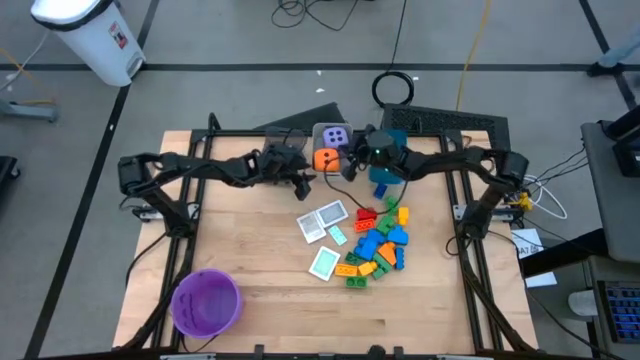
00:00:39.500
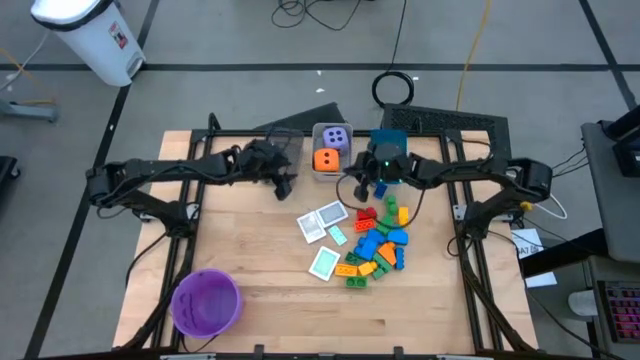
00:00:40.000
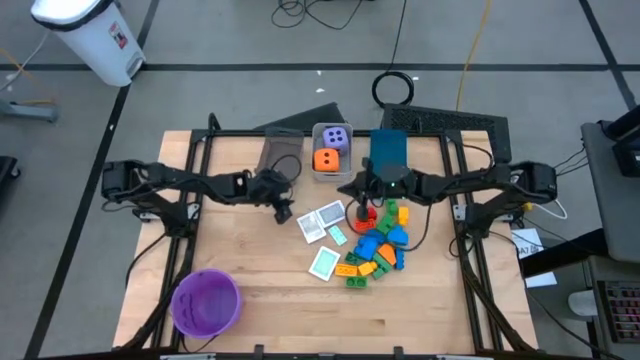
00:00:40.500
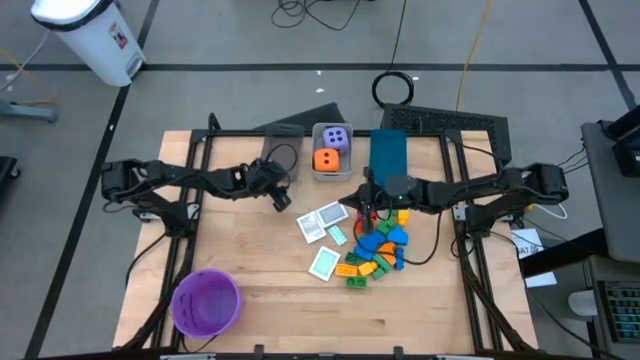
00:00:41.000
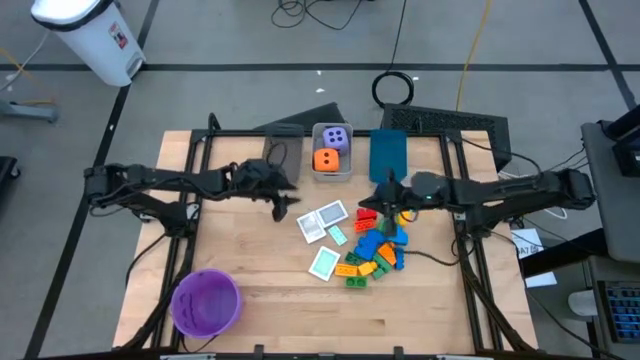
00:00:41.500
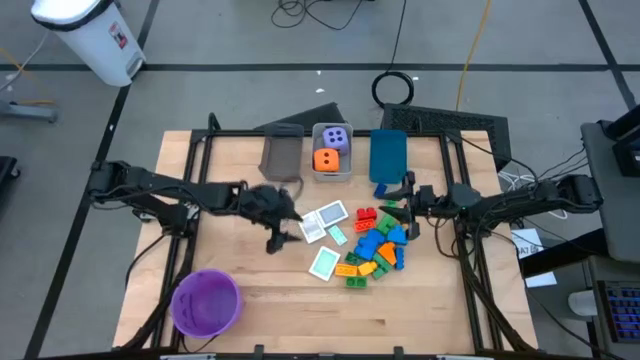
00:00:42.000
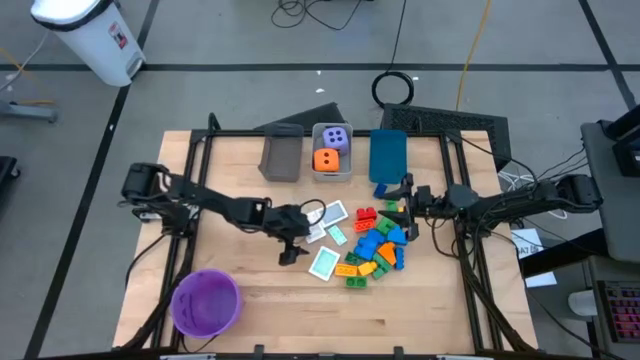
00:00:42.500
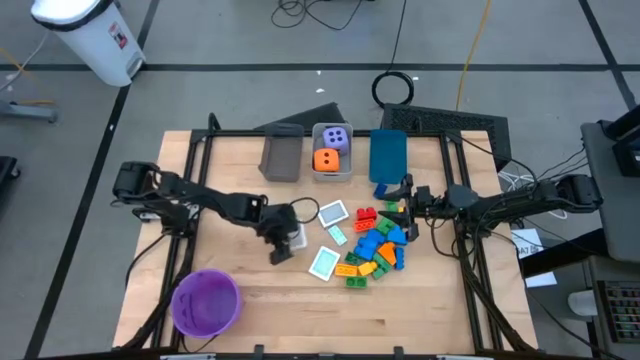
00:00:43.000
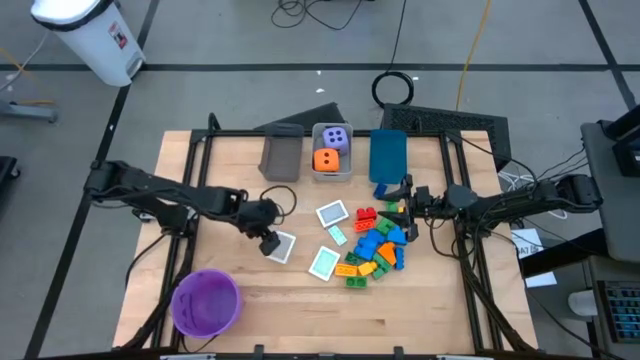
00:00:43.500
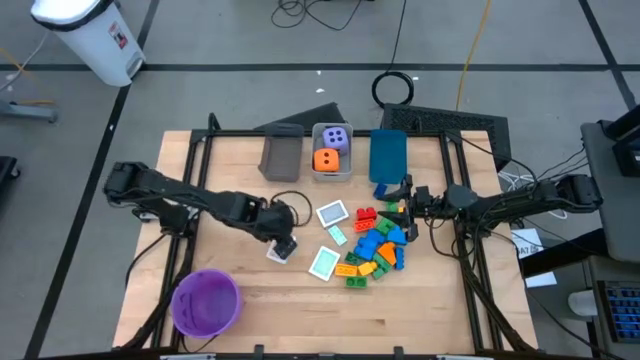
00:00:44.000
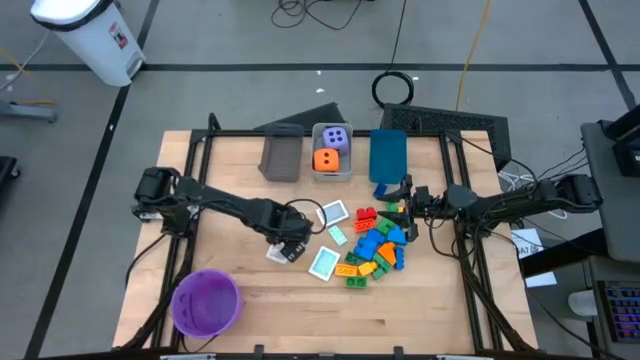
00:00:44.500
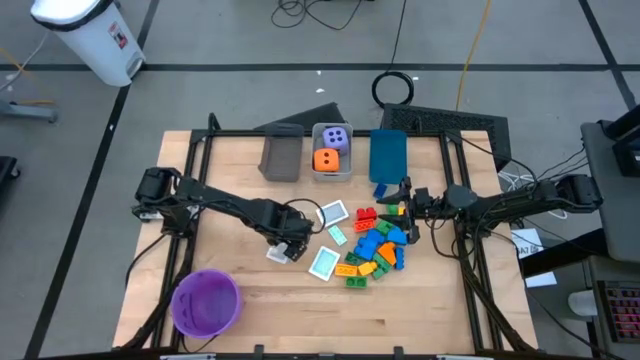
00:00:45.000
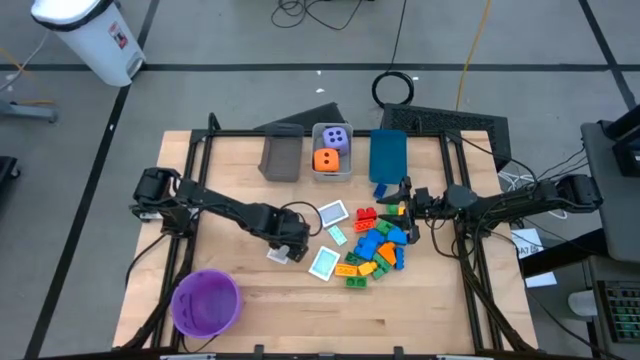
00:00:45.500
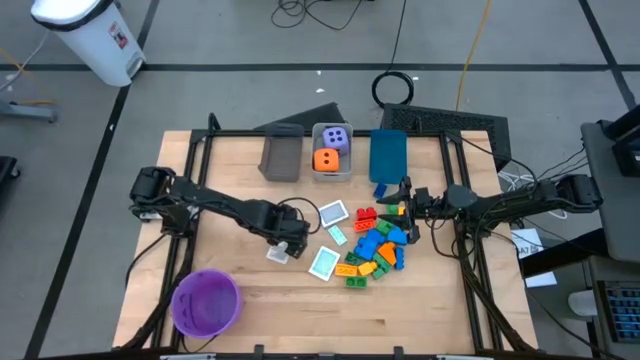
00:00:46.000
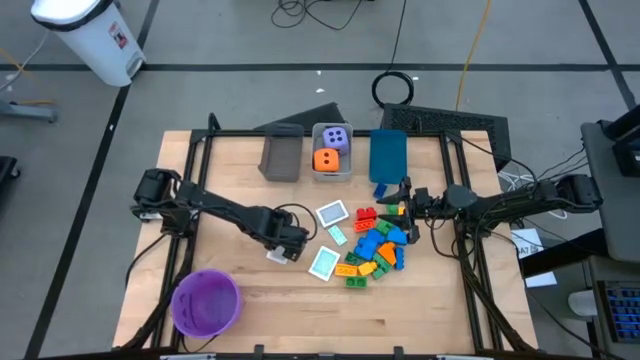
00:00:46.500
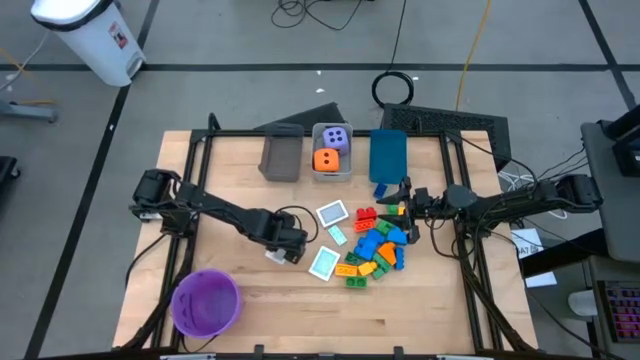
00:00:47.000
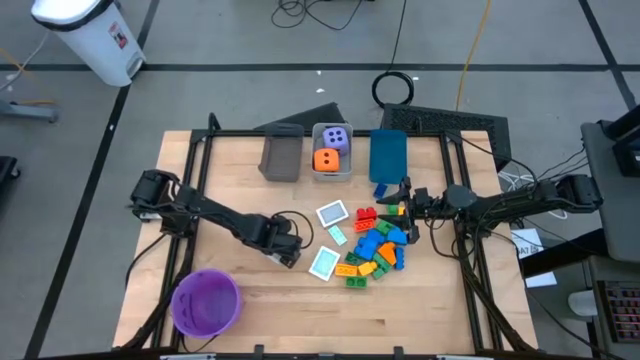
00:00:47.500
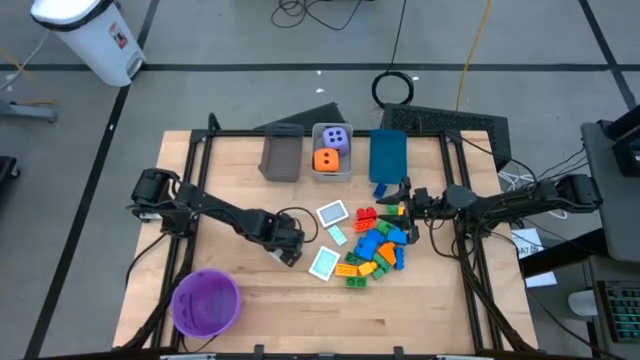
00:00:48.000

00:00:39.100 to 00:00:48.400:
Task: Pick & Place Toys
Put the brown deck of cards into the black bin

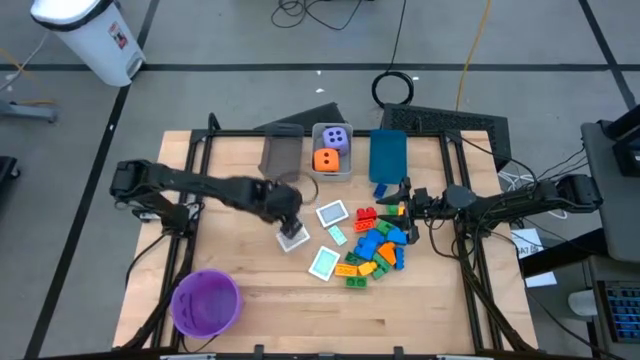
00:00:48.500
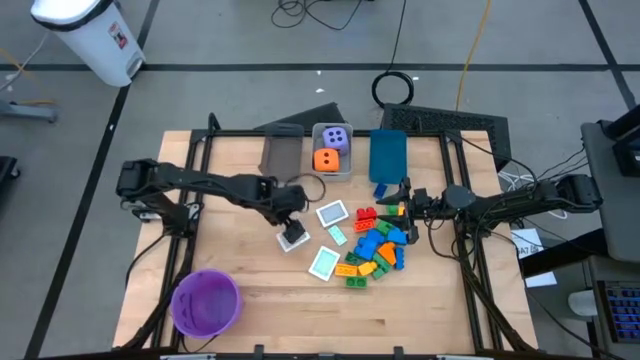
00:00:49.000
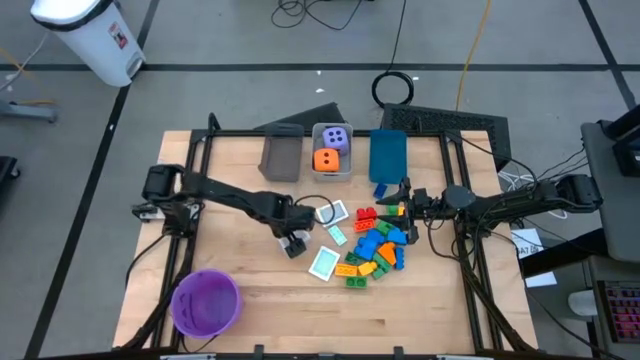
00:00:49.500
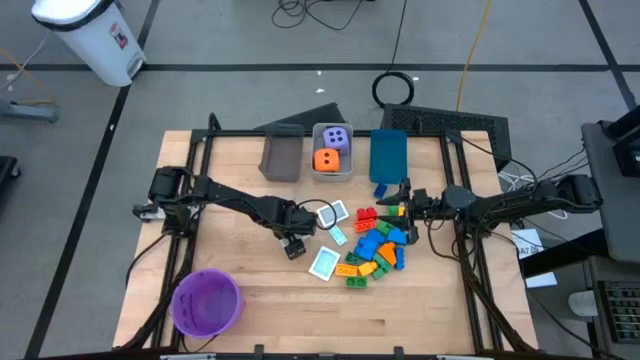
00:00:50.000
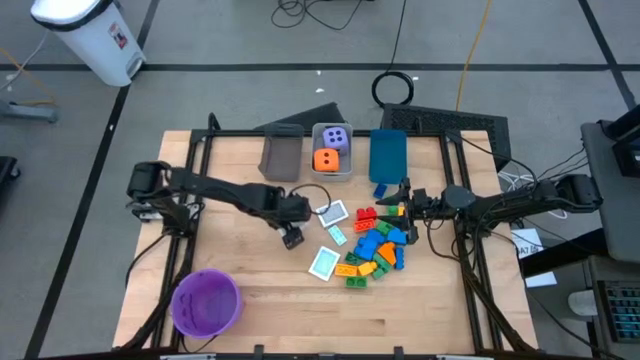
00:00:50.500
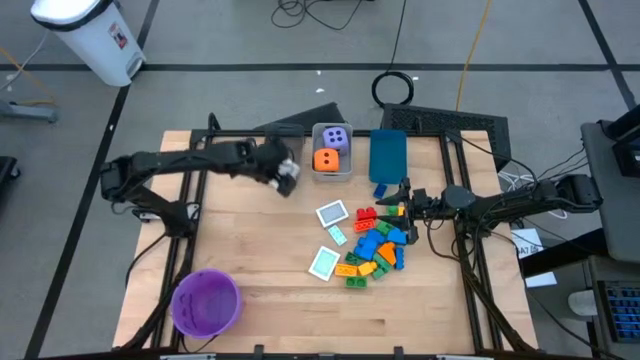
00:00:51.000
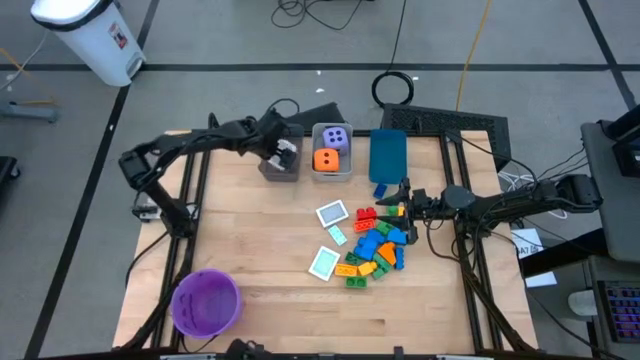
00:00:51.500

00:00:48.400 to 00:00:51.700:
Put the brown deck of cards into the black bin

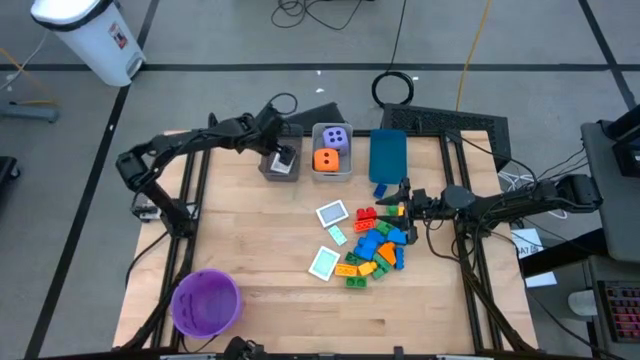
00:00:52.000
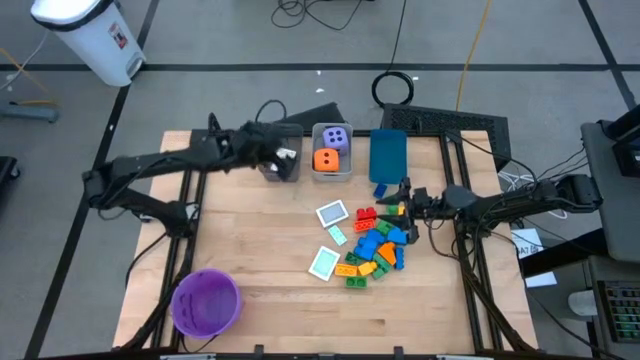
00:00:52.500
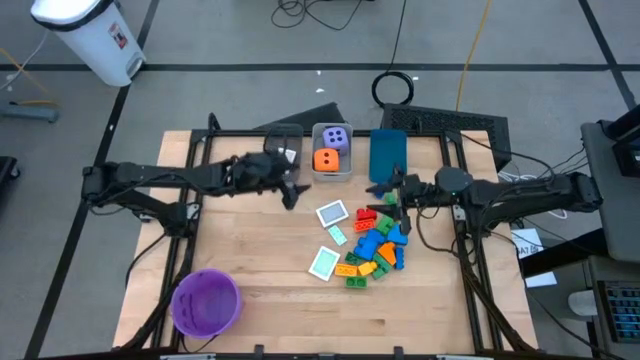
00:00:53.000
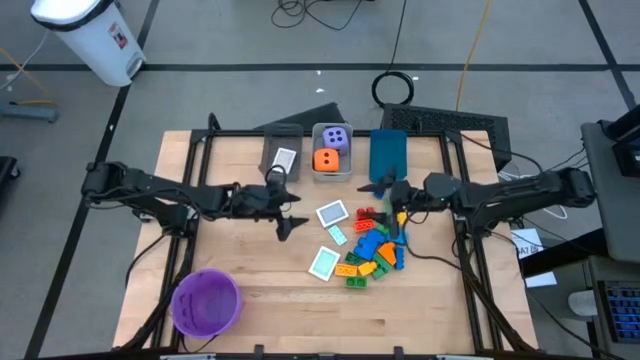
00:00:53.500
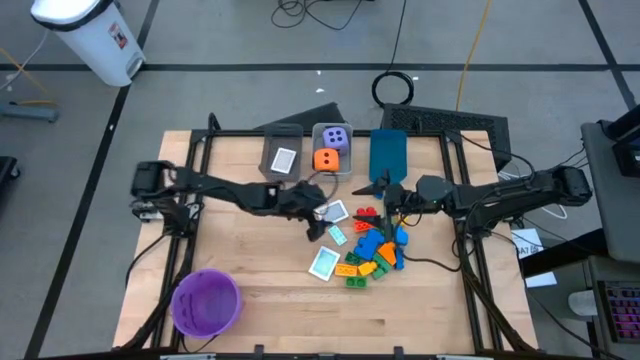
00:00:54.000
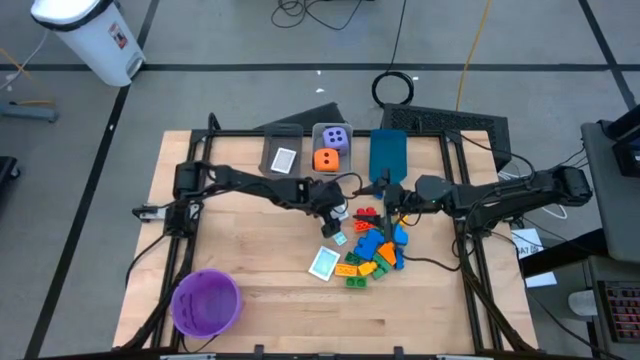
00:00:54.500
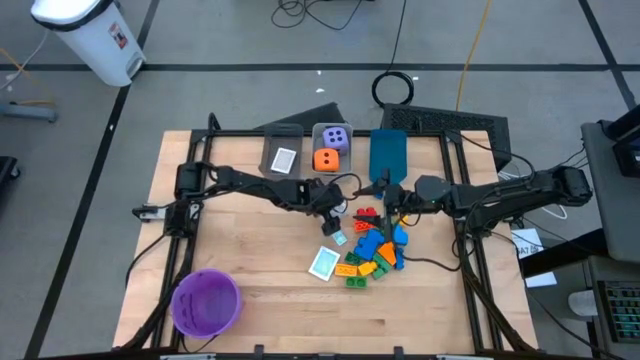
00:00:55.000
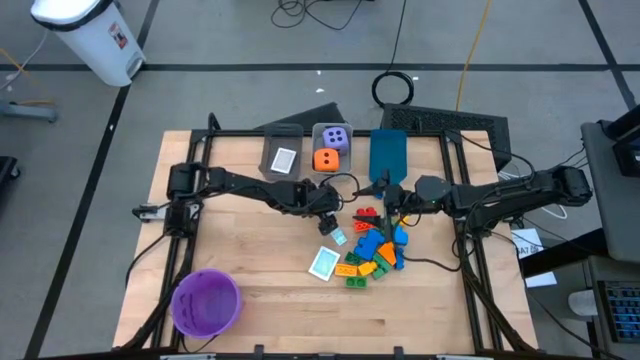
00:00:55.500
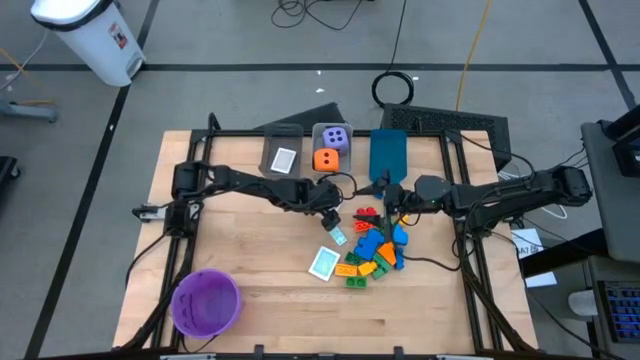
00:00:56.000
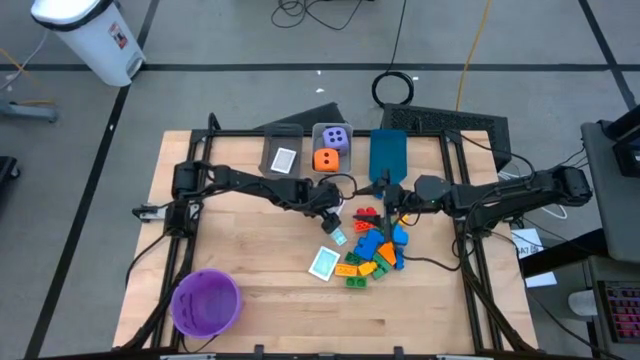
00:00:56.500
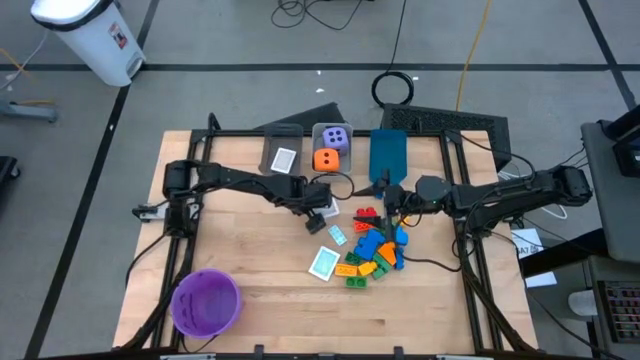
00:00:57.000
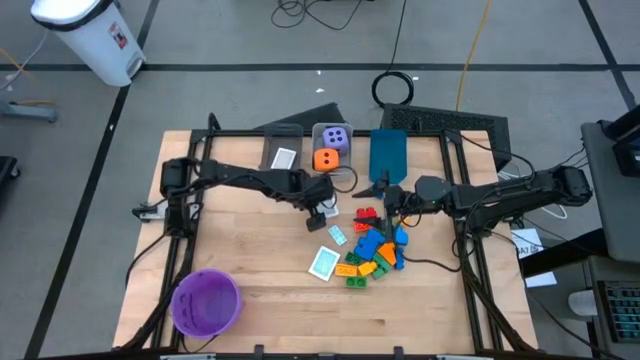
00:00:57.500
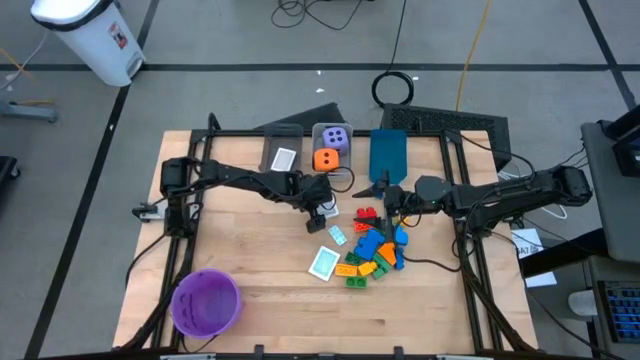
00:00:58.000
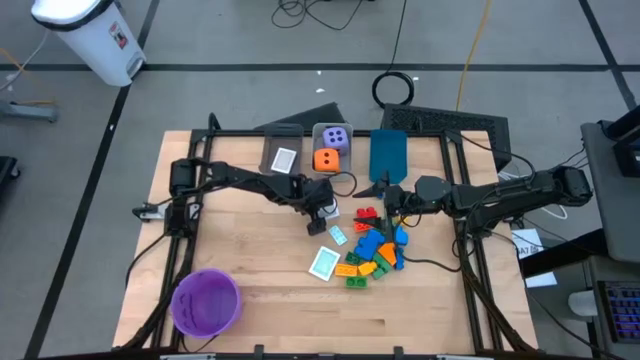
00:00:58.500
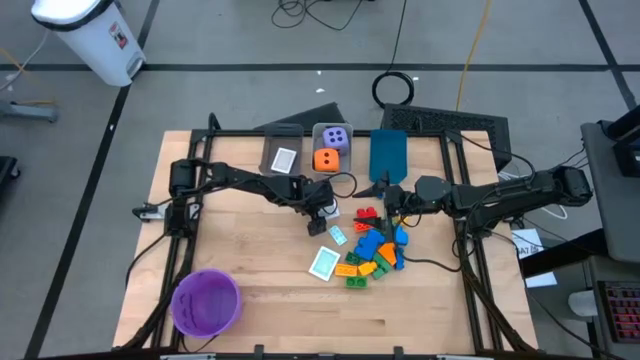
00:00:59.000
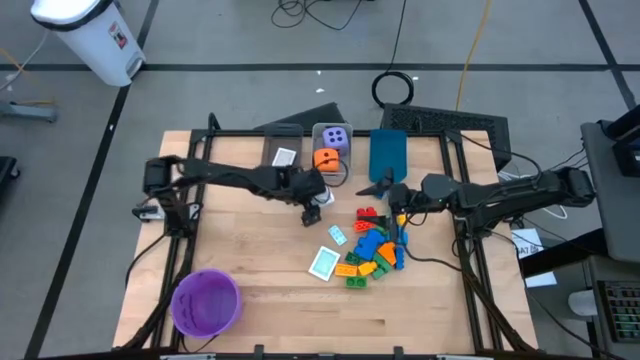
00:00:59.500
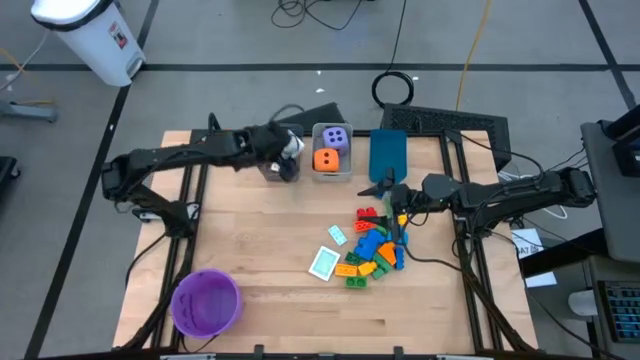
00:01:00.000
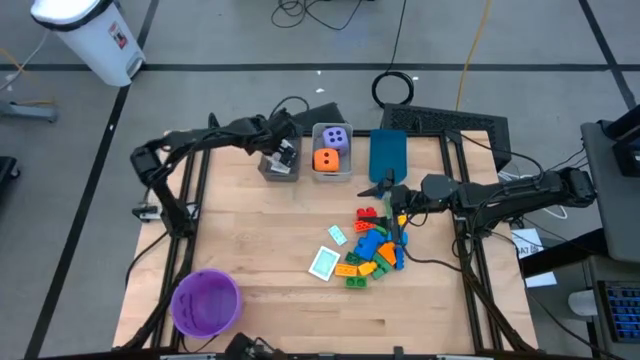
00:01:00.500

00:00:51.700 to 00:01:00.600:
Put the black deck of cards into the black bin
